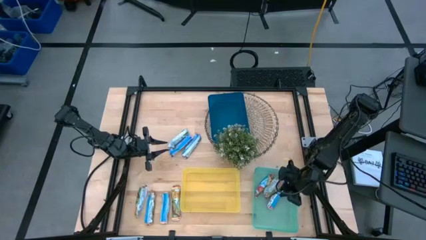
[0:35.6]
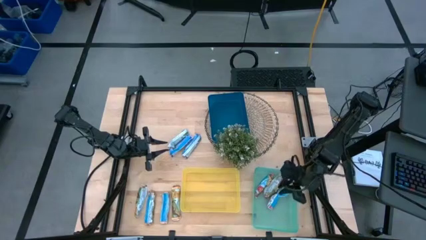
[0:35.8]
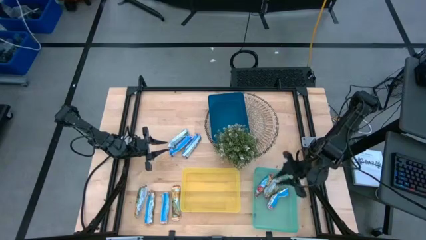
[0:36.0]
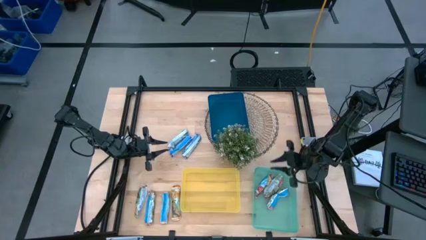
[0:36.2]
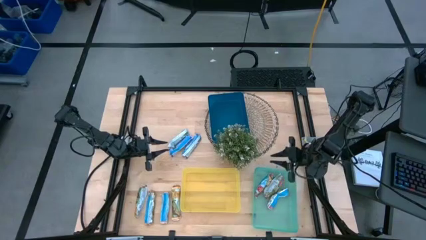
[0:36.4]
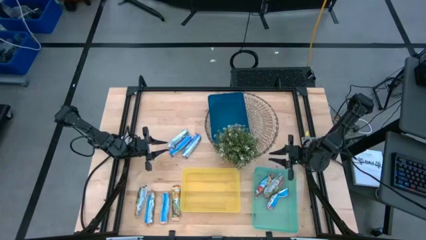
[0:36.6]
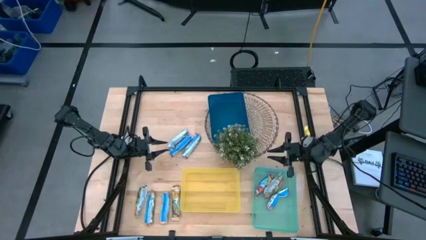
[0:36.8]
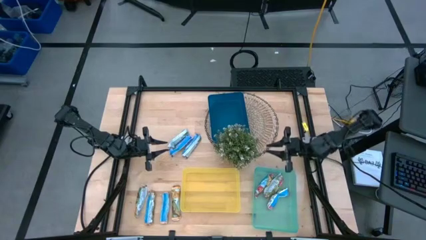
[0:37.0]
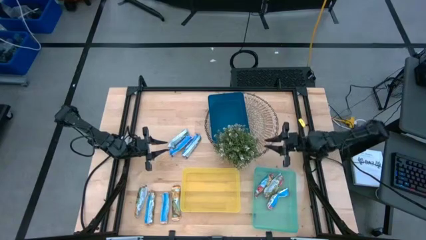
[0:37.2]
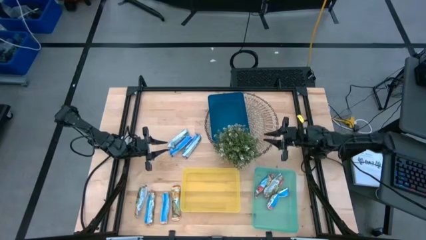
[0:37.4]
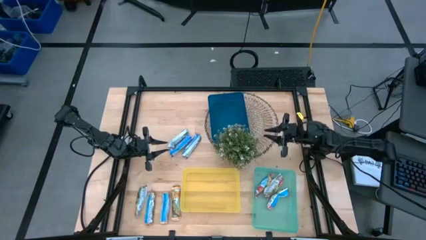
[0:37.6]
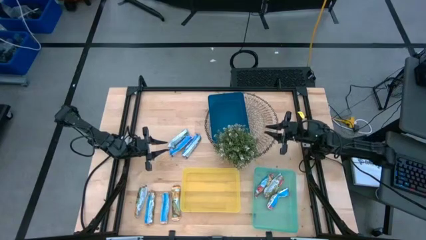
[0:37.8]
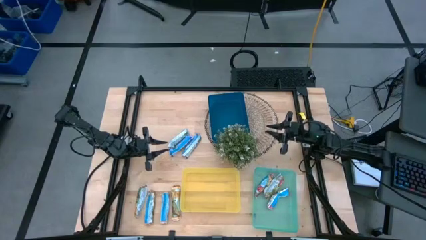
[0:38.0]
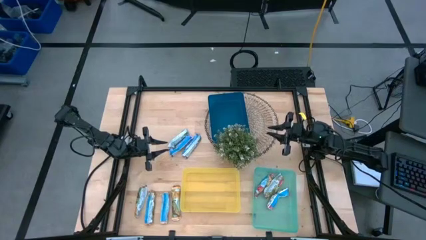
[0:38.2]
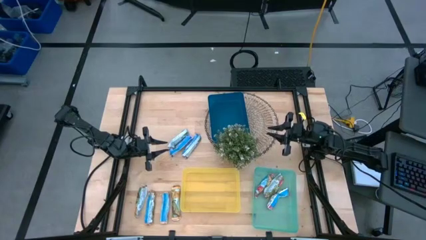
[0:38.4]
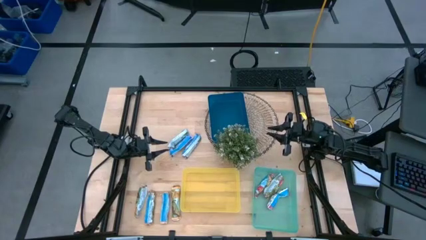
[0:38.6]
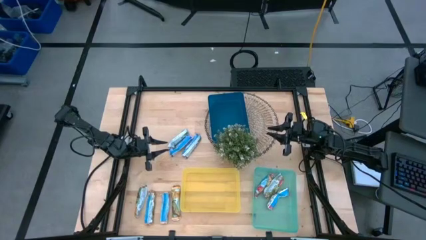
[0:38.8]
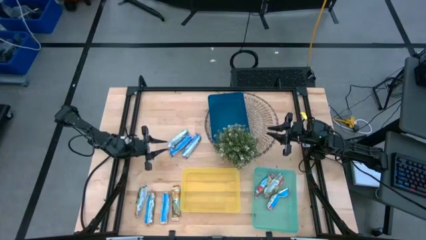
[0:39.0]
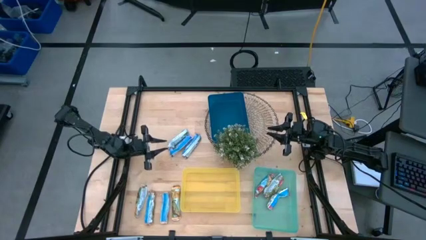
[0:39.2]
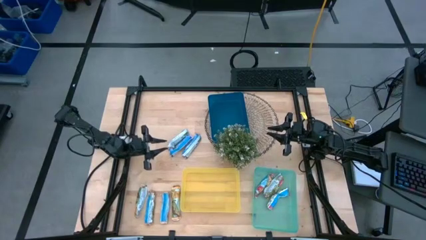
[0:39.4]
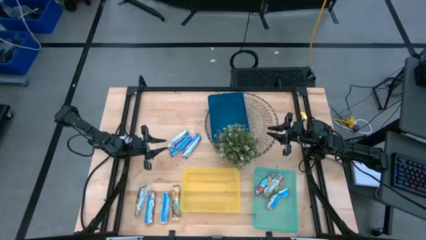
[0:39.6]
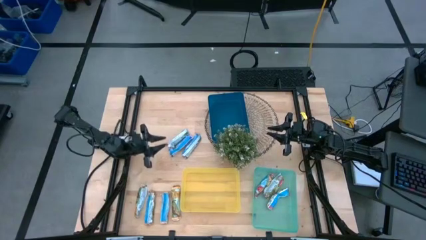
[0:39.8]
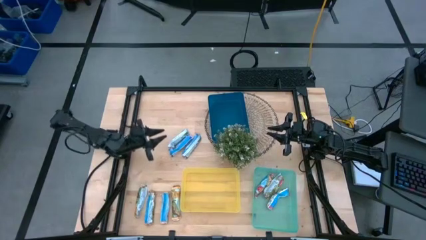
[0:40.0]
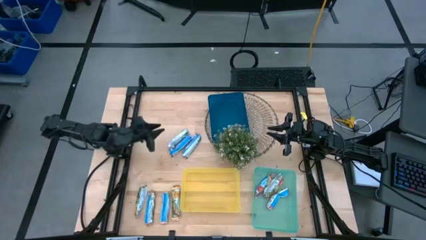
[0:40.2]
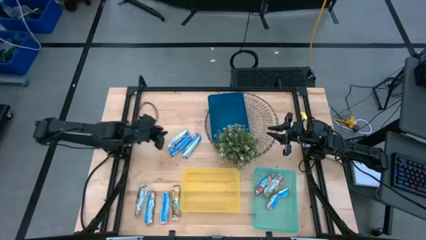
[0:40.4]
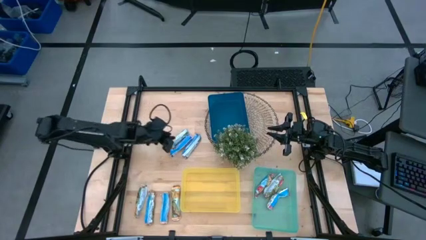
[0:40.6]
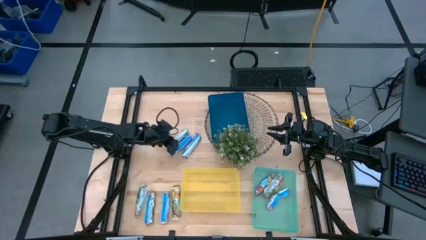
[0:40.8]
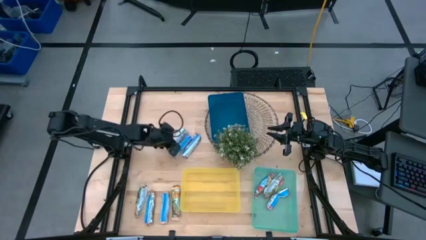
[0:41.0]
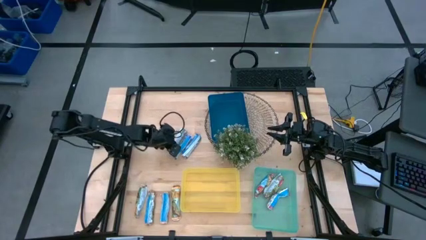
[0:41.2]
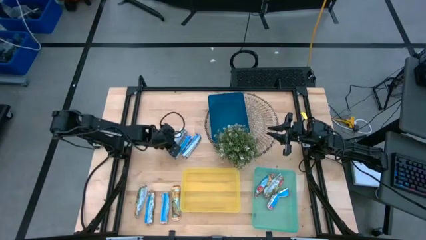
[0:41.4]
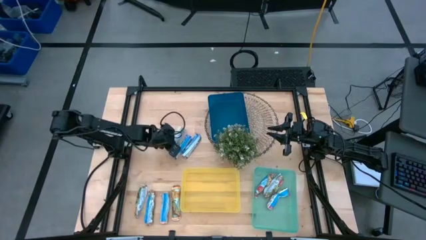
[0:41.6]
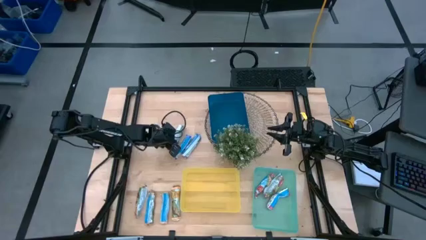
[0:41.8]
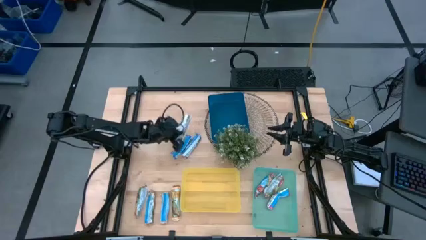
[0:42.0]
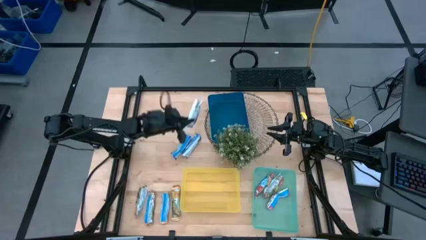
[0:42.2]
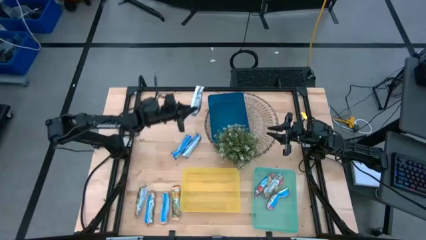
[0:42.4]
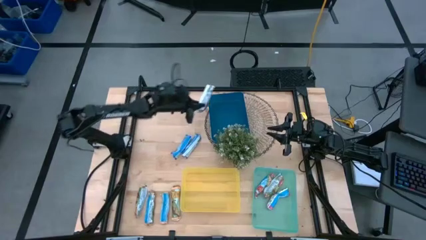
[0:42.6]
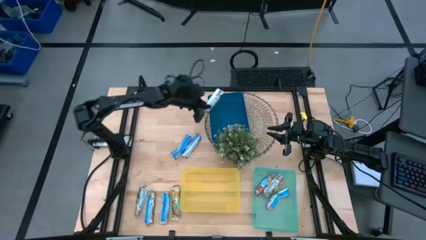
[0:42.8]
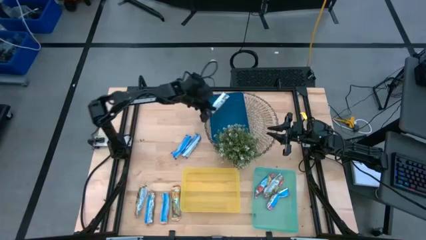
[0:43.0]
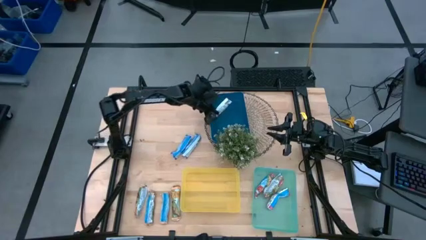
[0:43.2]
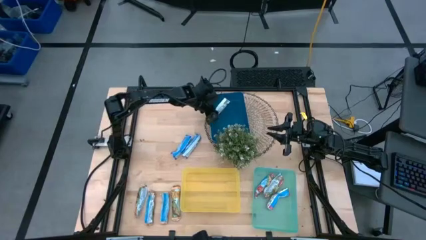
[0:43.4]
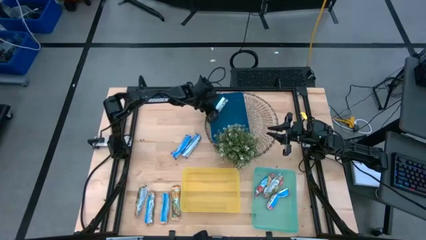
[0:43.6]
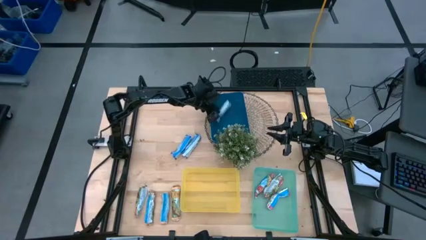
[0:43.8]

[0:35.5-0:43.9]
Task: Pick and place Granola Bars by type
Put the blue granola bar into the blue bin

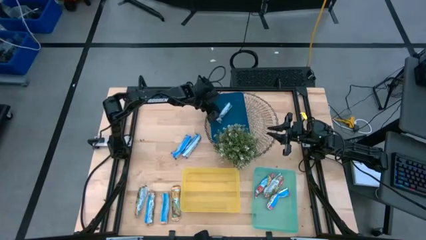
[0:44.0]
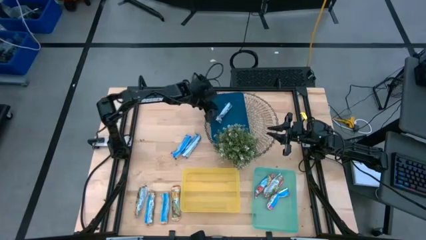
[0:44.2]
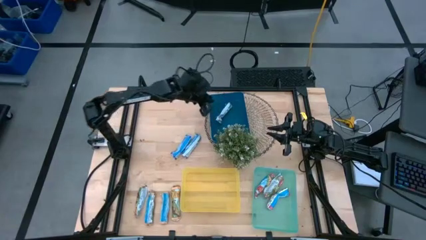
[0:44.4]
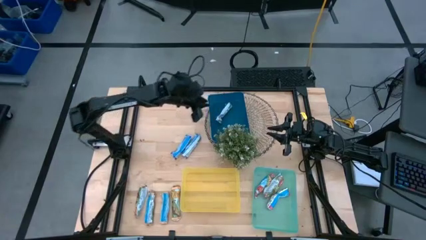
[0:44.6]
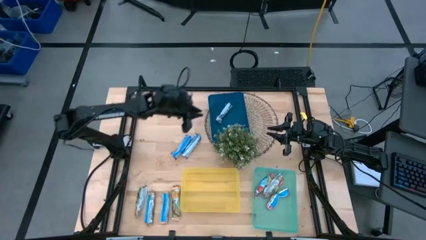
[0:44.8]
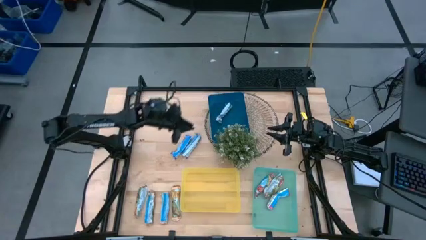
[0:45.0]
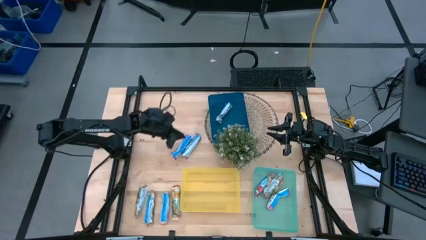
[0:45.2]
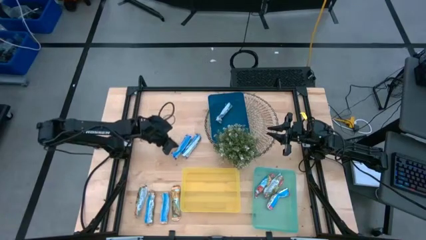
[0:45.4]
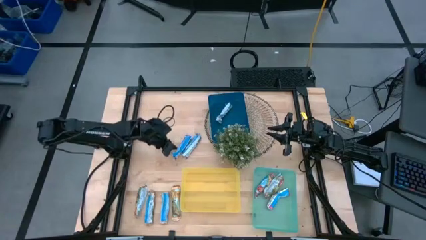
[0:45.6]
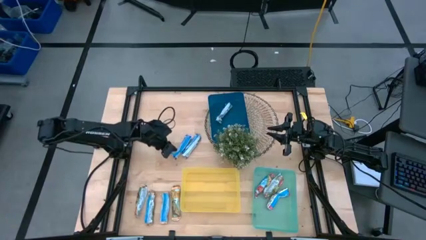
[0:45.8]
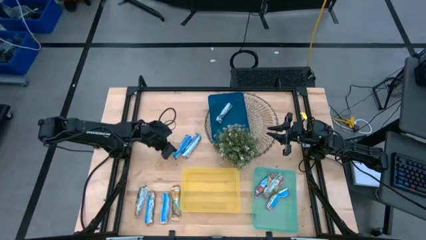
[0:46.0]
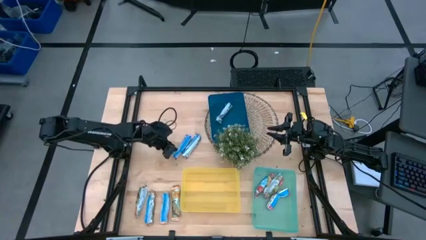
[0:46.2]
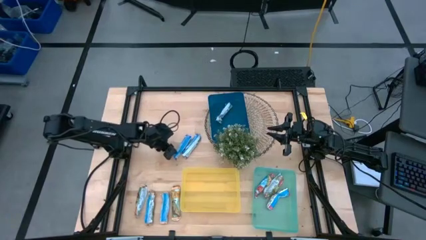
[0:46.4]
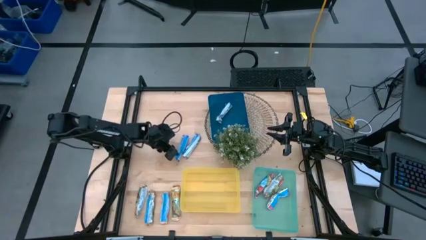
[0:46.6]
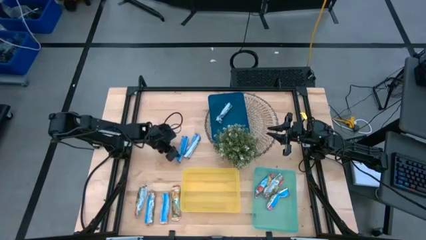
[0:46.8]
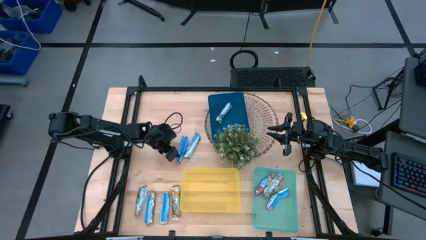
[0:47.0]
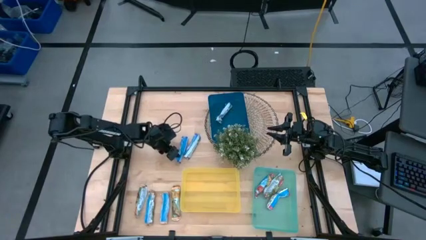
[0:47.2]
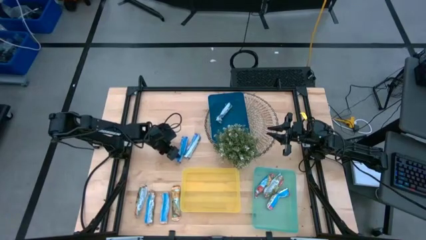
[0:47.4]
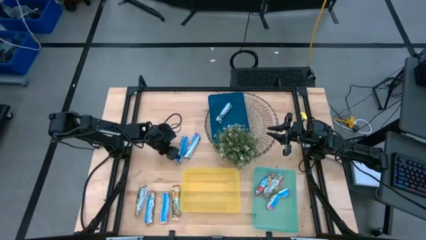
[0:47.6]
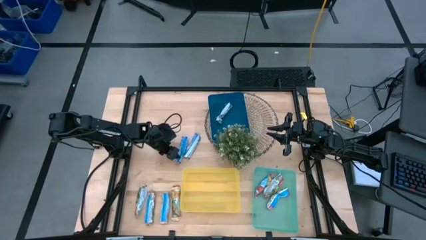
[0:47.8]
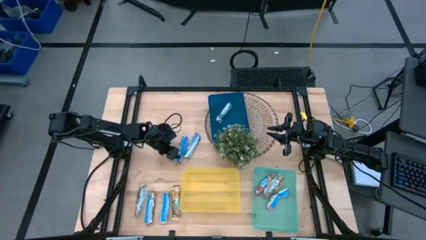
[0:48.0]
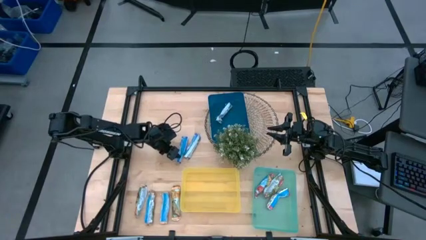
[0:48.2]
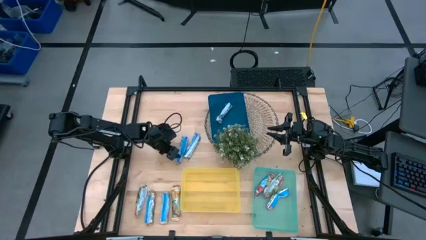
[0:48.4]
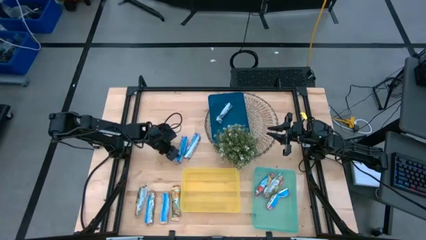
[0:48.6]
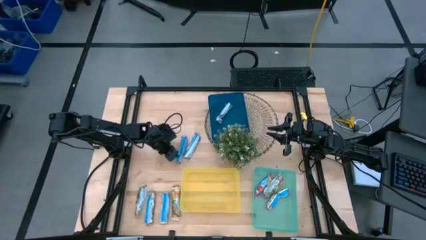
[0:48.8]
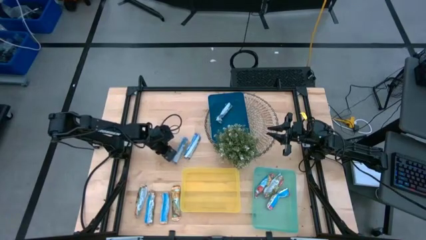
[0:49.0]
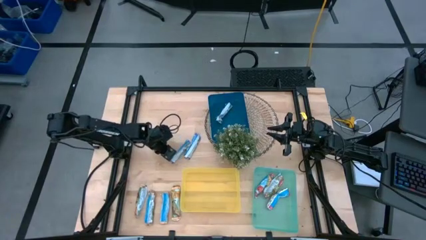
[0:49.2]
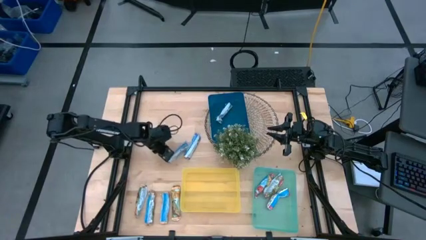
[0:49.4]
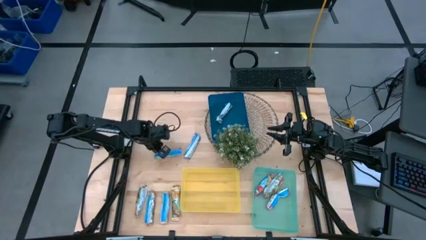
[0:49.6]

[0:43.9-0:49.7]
Put the blue granola bar into the blue bin
